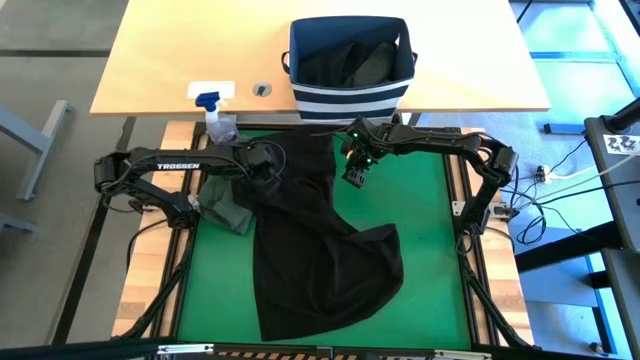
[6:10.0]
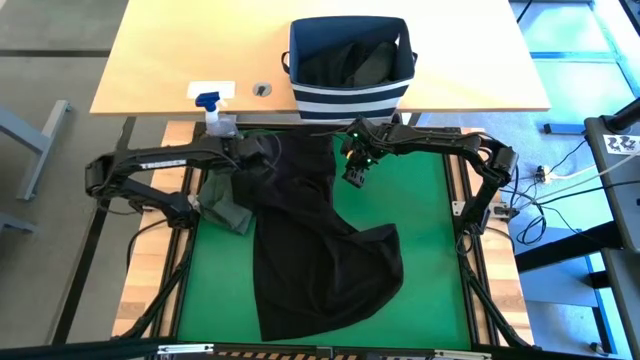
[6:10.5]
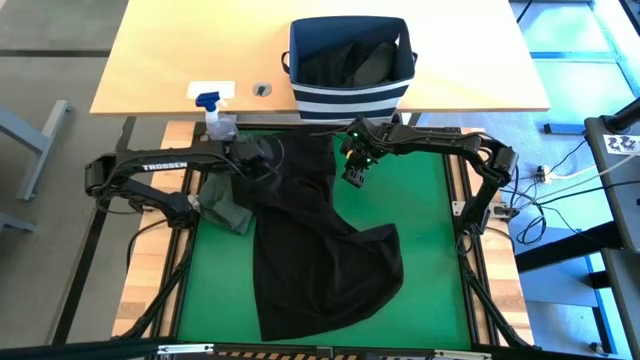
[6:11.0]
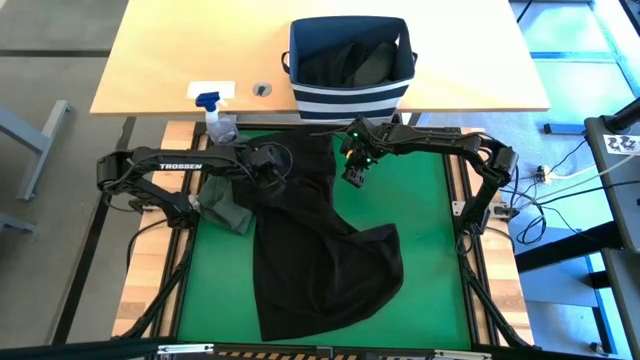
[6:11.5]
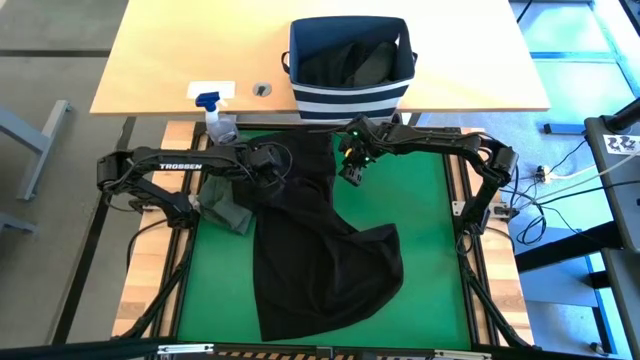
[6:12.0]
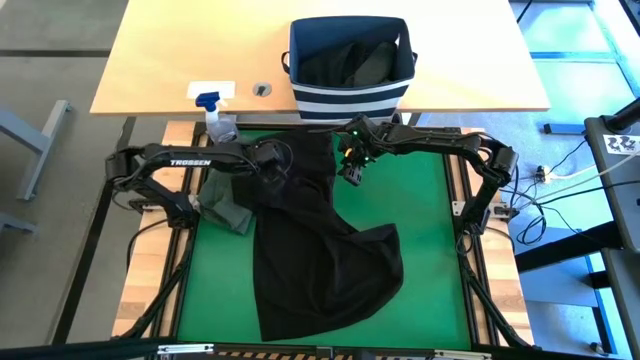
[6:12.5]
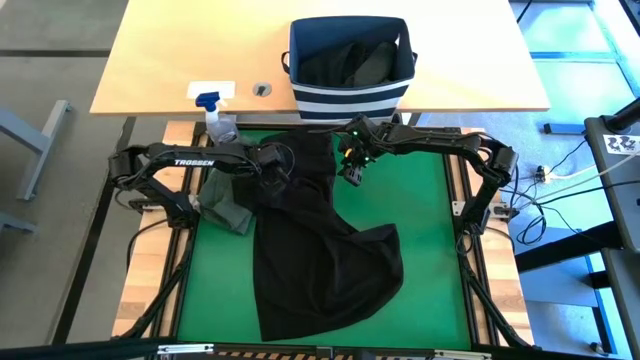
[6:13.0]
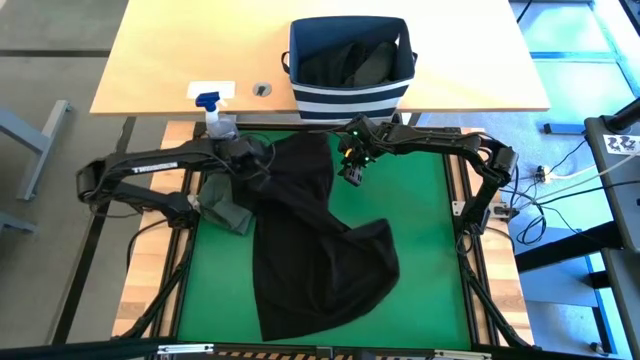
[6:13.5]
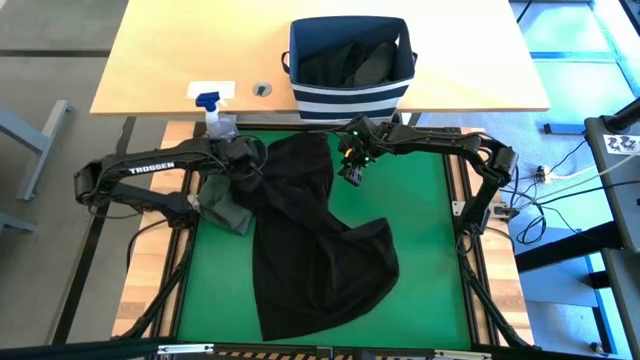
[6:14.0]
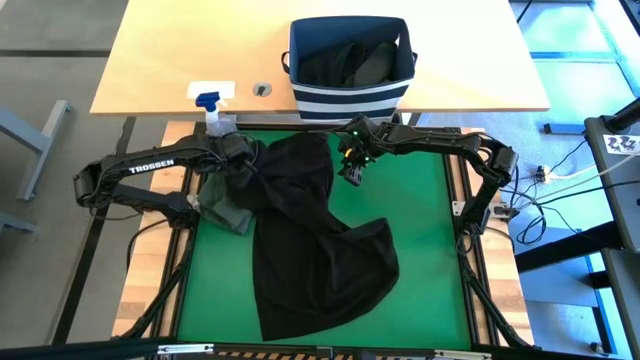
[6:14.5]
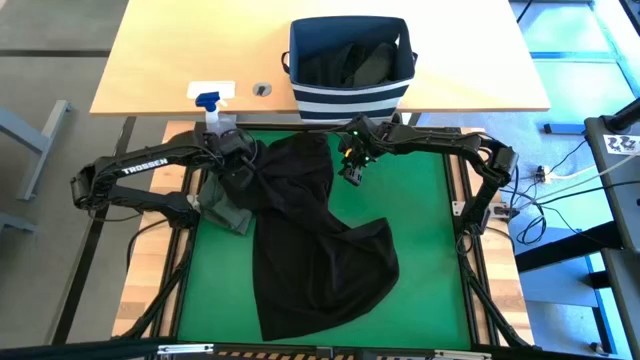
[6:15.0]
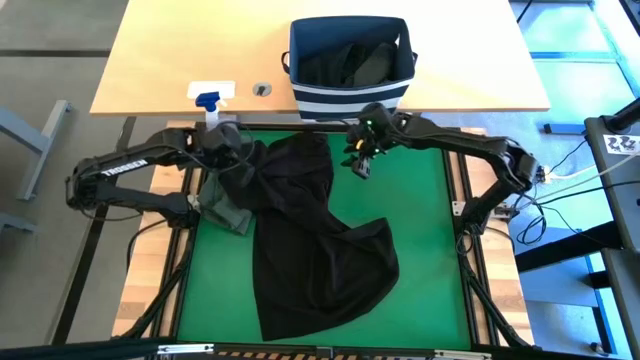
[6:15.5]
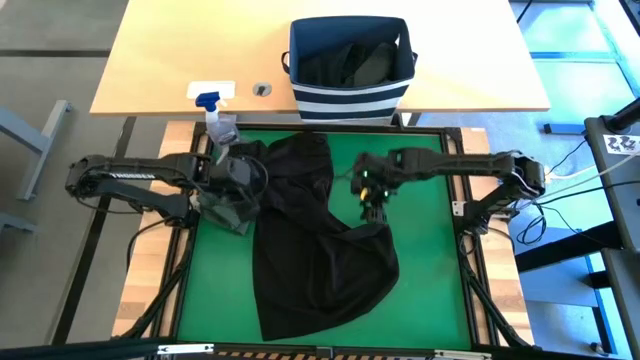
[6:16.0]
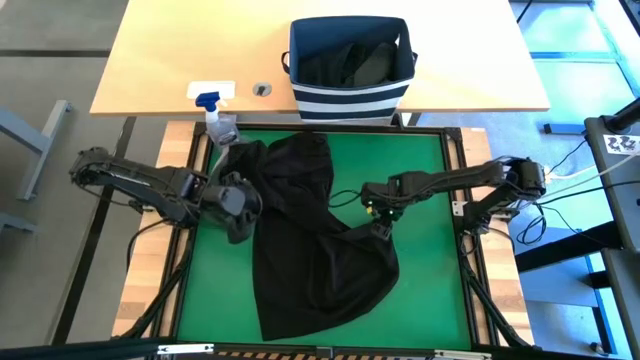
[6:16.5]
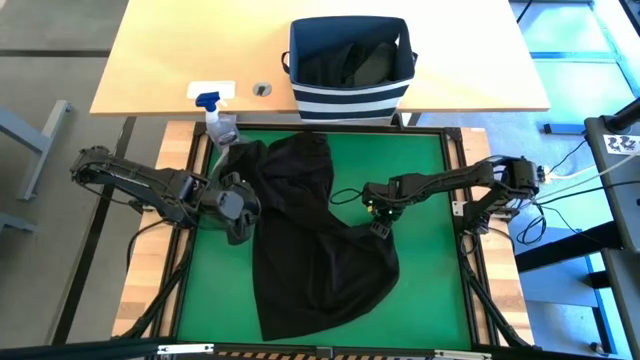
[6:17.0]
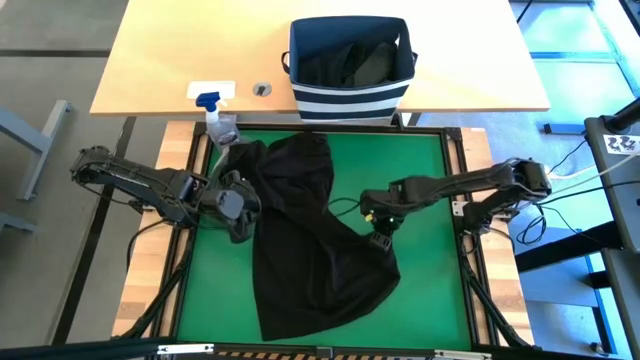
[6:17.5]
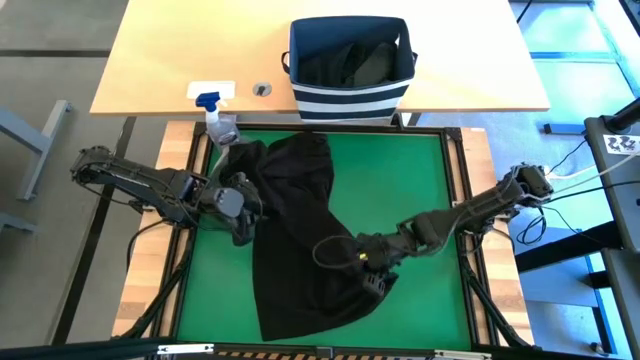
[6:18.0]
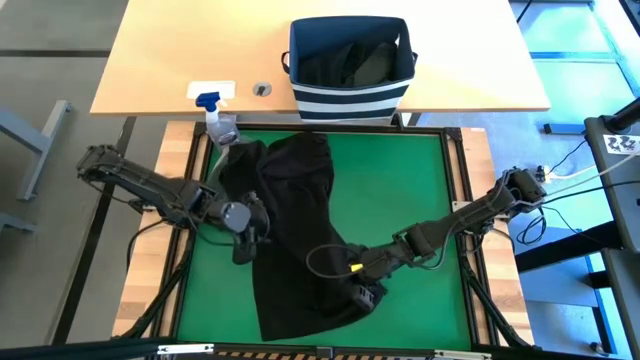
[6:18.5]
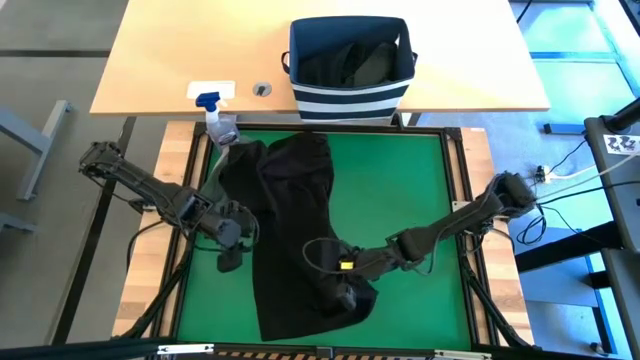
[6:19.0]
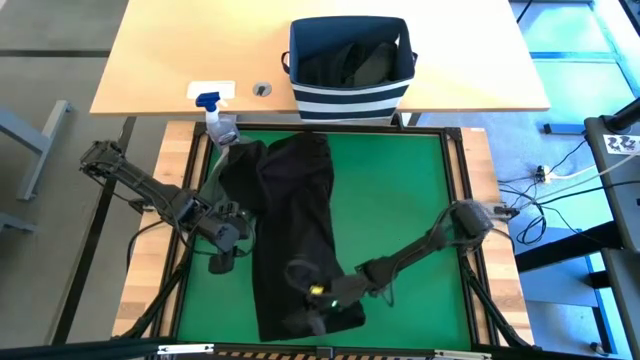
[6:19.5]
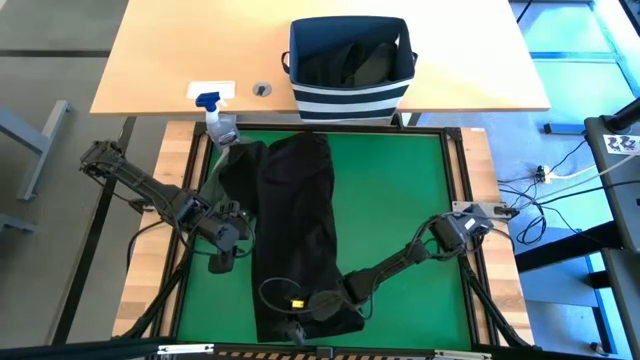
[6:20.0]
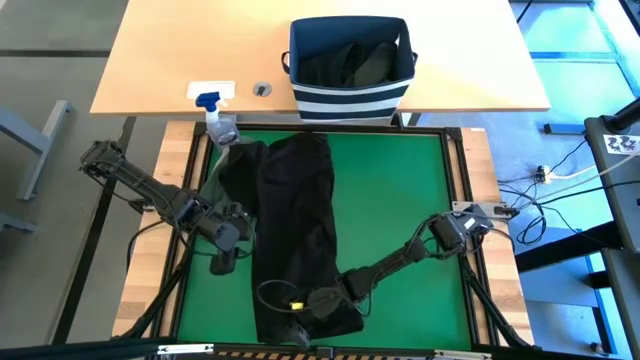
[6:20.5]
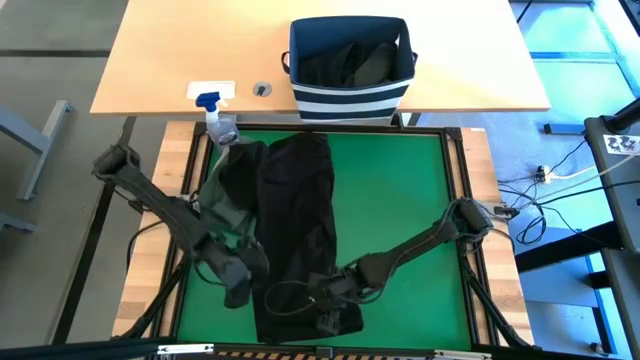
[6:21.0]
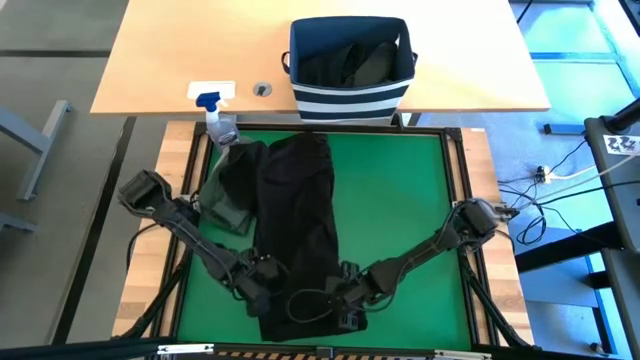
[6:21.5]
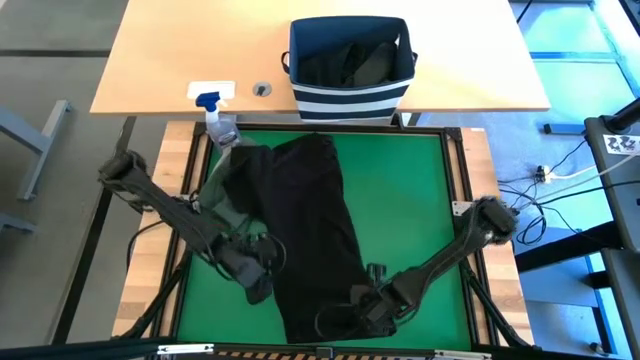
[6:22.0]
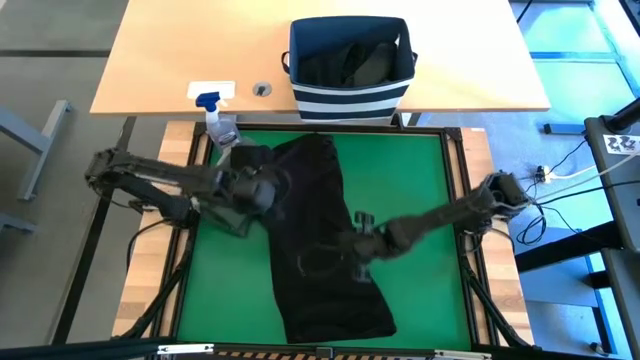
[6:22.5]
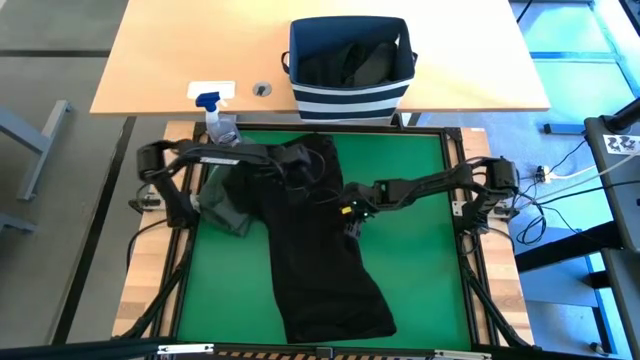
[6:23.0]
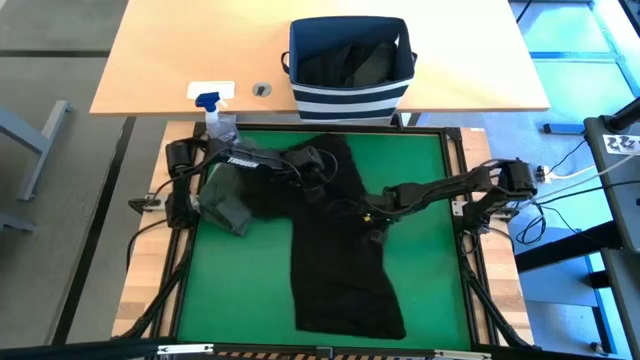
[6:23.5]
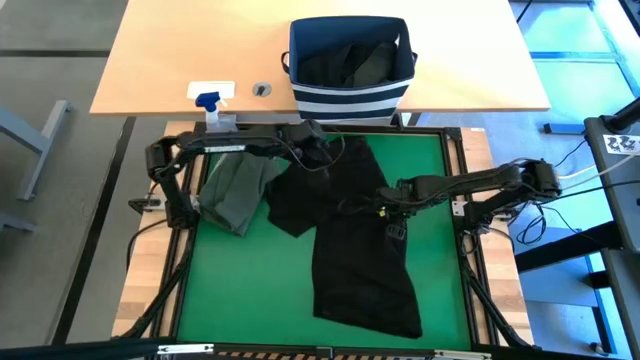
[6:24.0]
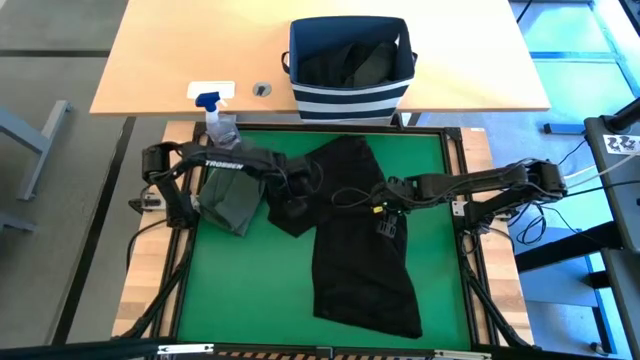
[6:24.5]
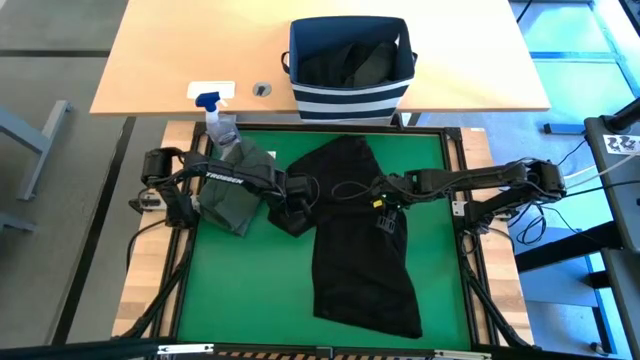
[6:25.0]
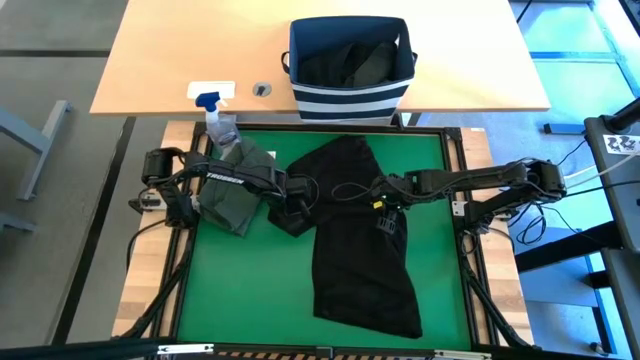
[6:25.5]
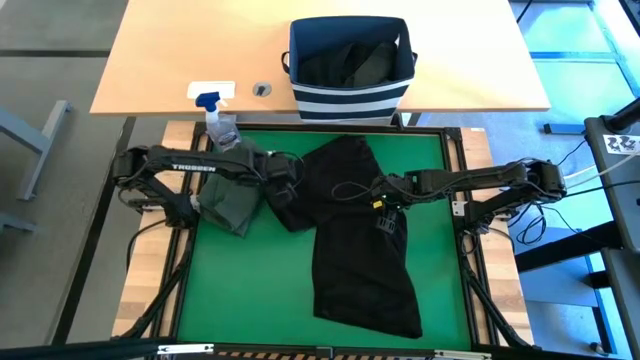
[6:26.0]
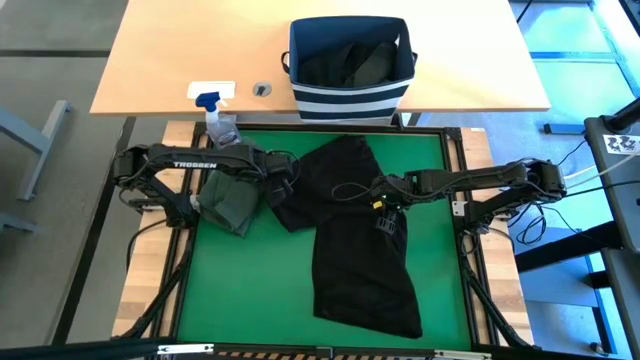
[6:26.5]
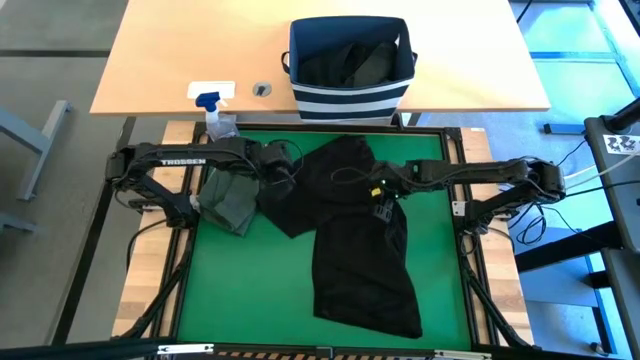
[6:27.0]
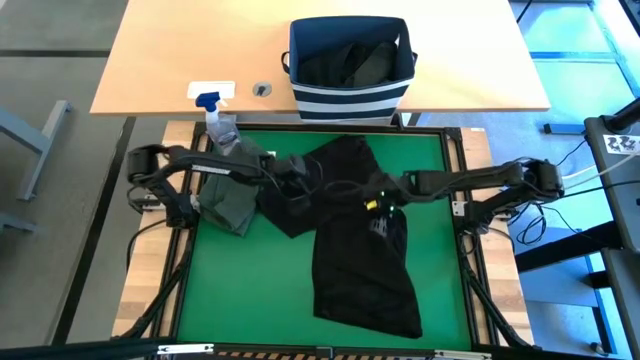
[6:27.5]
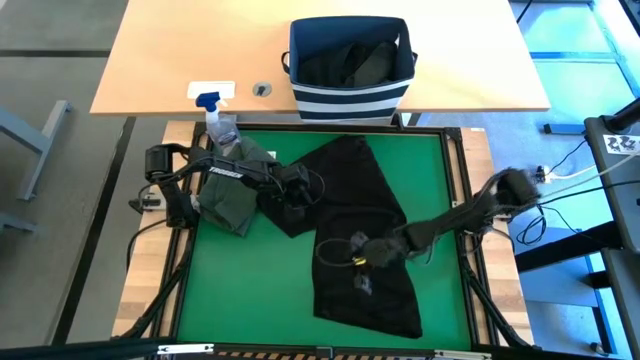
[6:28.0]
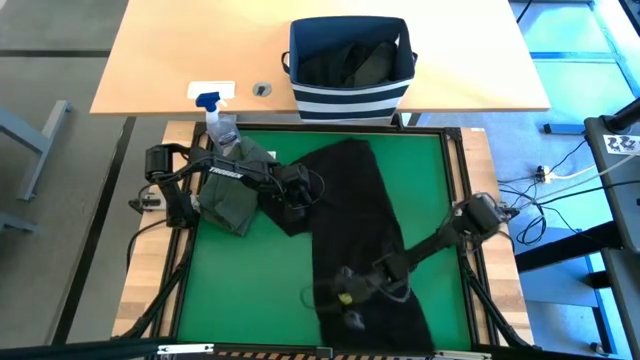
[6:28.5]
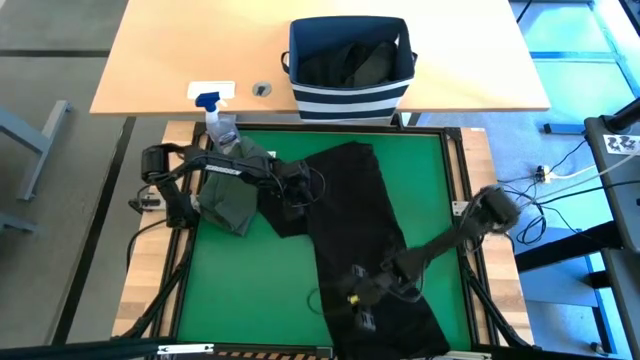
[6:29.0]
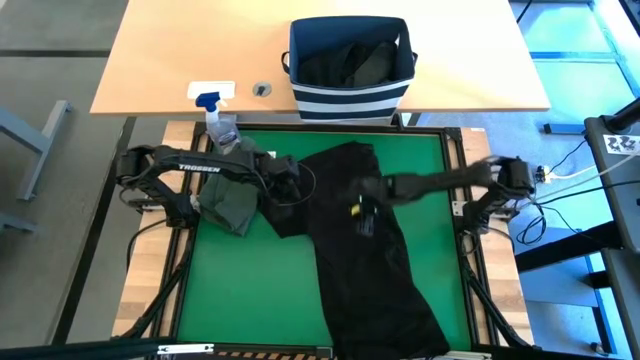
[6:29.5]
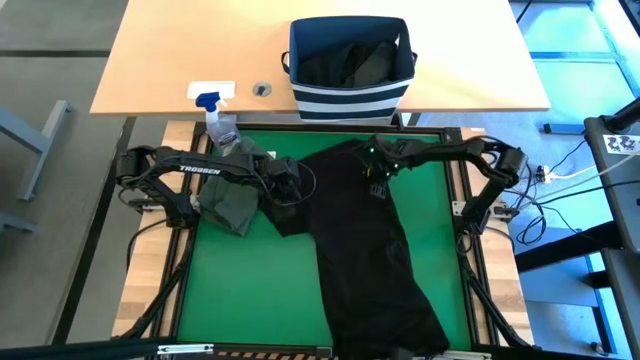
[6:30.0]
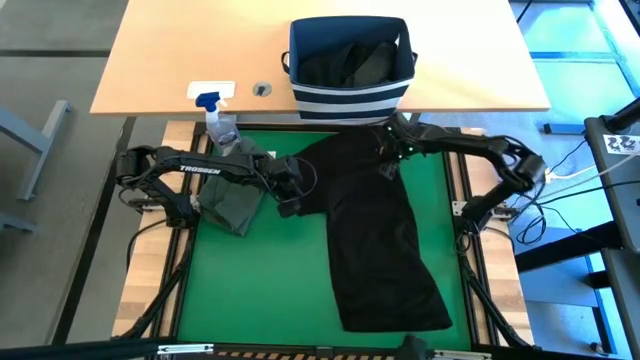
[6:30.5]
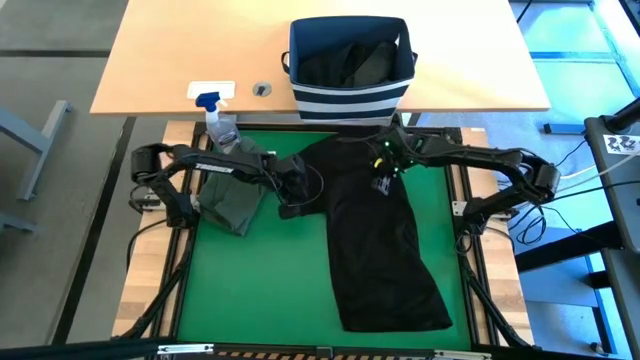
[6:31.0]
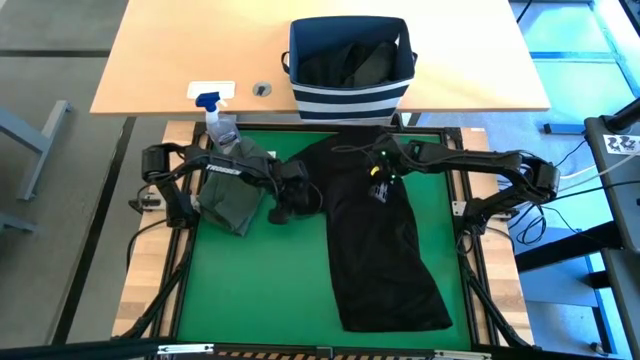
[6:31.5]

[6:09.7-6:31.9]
Task: Fold Laundry from Bin
Fold the black shirt
